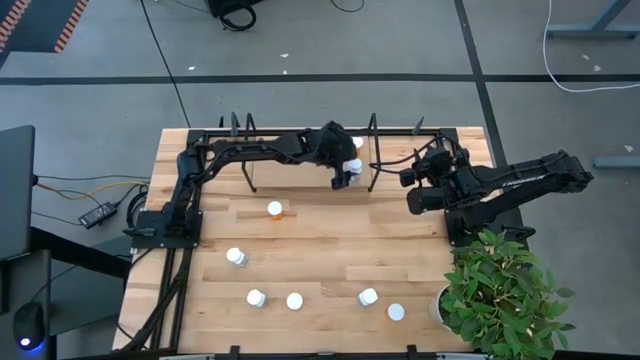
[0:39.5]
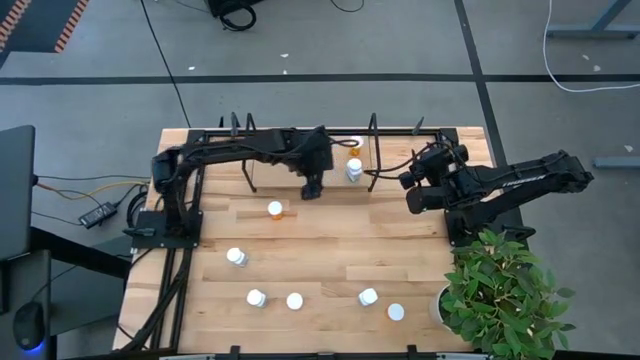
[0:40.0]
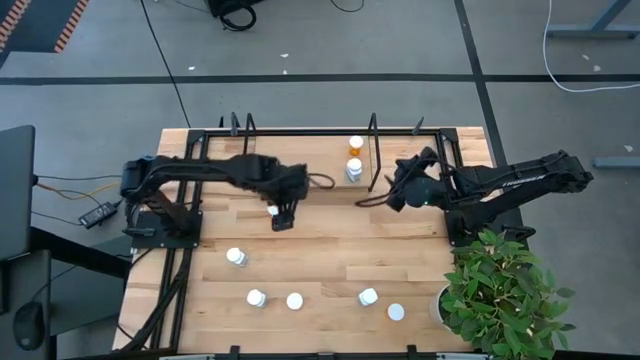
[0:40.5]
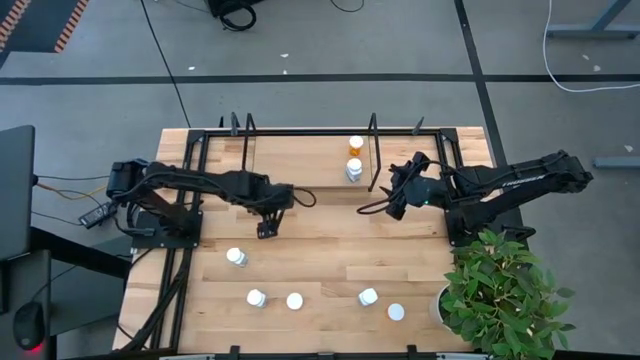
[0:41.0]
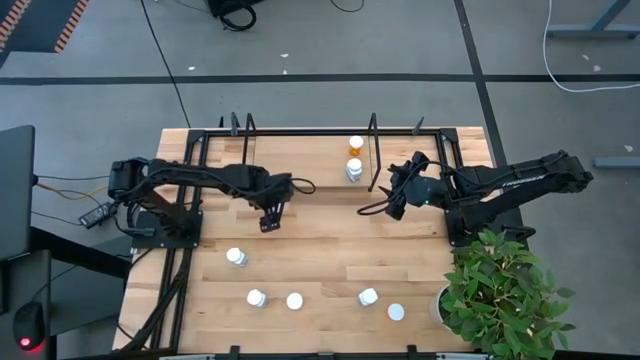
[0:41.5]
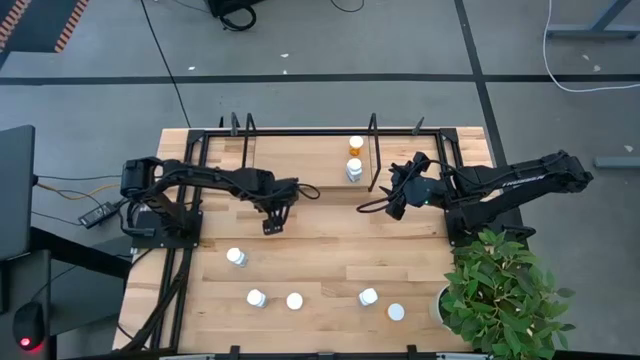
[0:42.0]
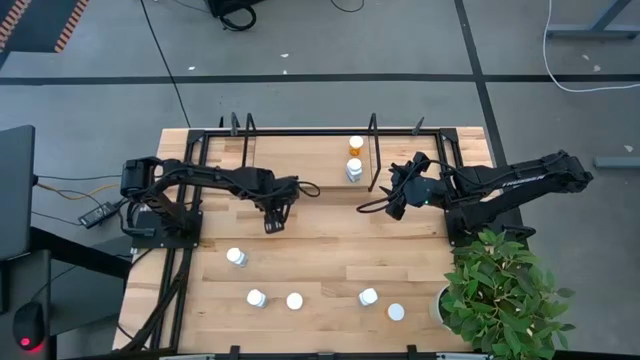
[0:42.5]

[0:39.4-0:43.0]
Task: Pick and place medicine bottles onto shelf by color
Put the orange pill bottle on the shelf

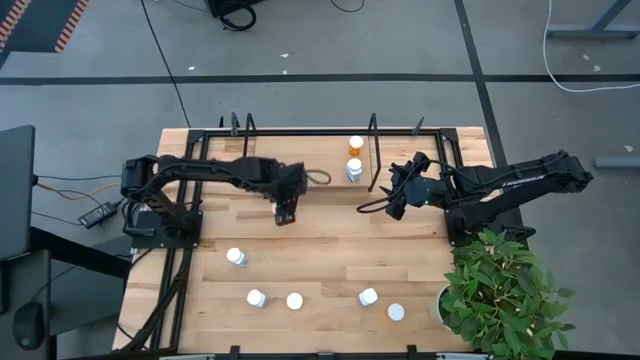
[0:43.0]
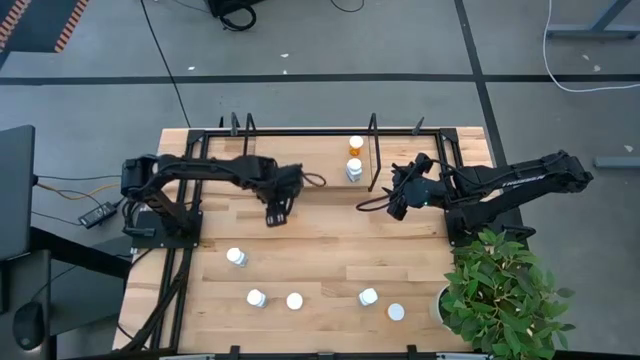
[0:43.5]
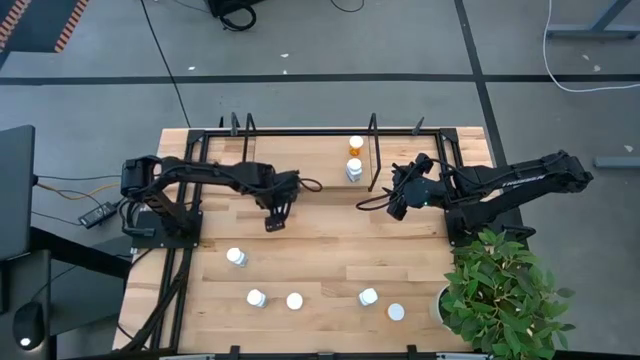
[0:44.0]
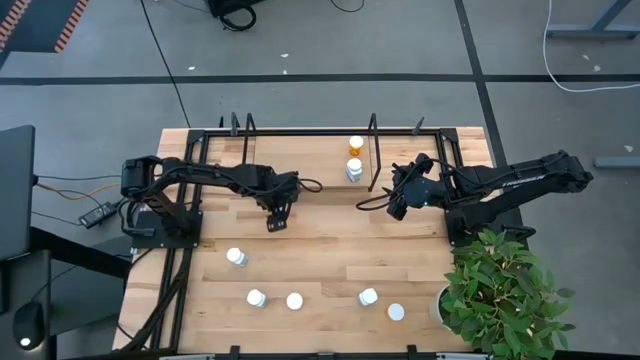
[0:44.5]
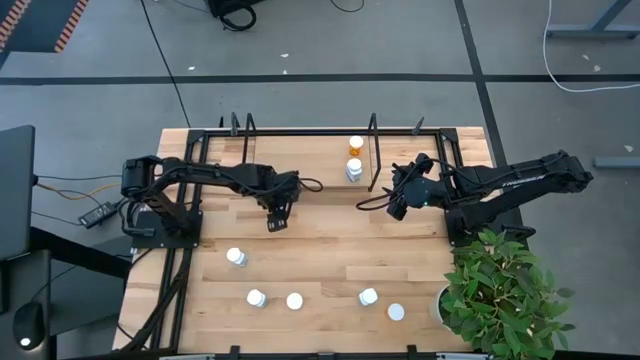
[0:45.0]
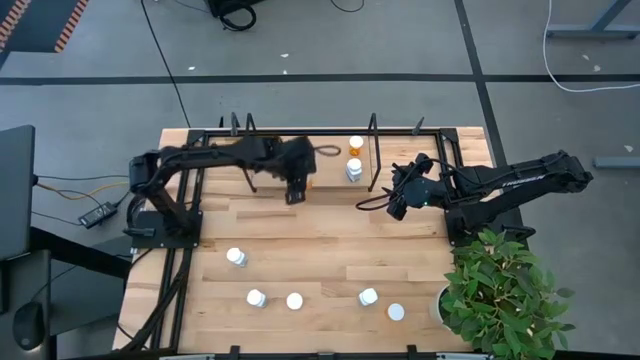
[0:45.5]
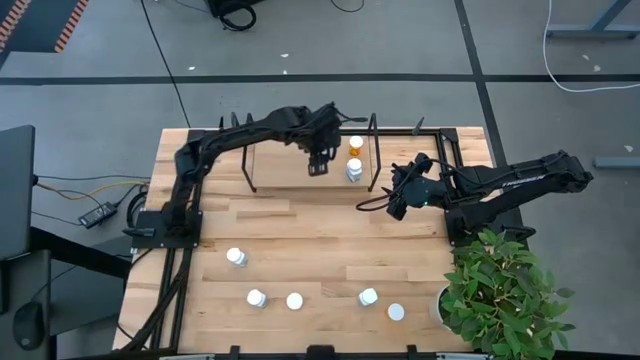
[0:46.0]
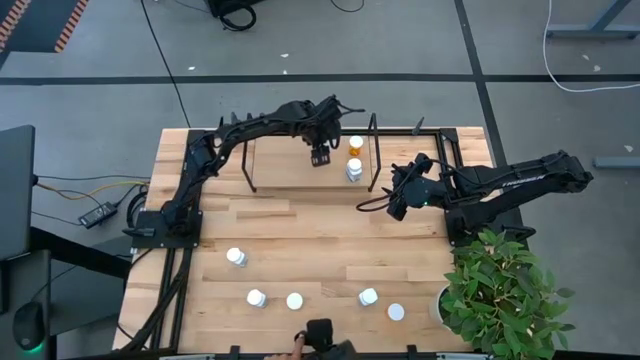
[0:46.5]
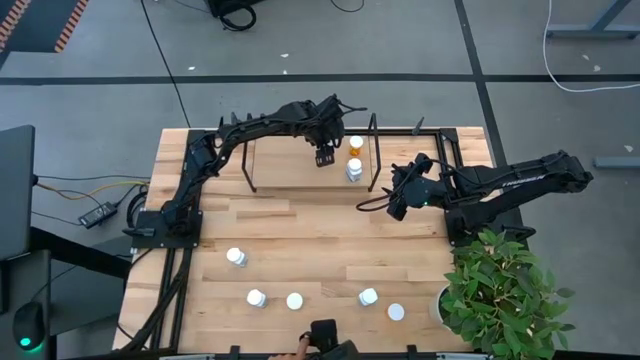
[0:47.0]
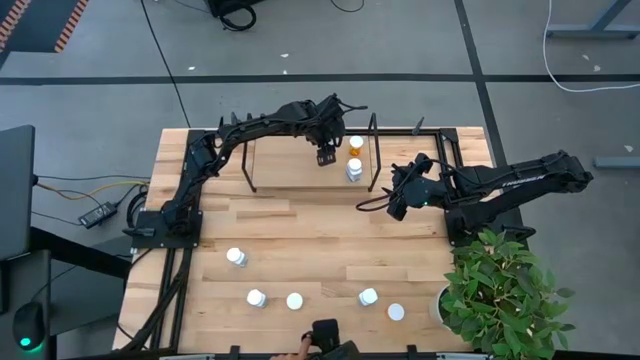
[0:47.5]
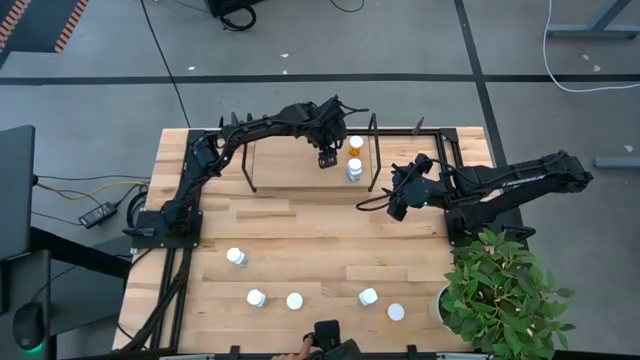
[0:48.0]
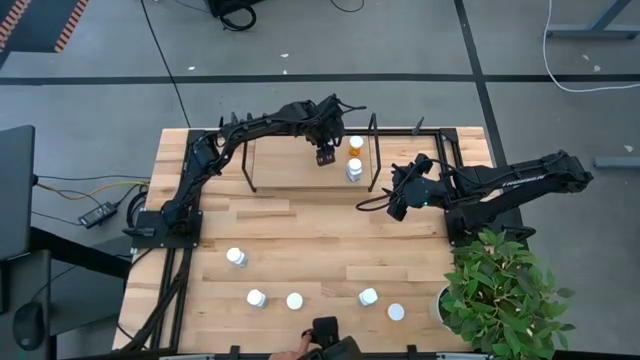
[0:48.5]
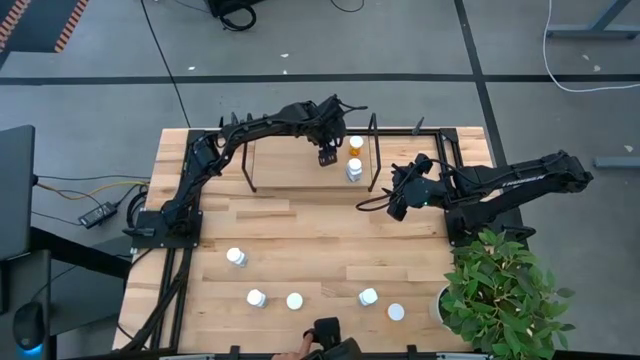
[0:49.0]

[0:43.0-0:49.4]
Put the orange pill bottle on the shelf

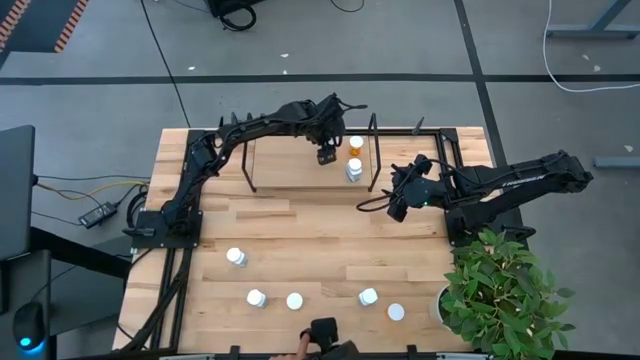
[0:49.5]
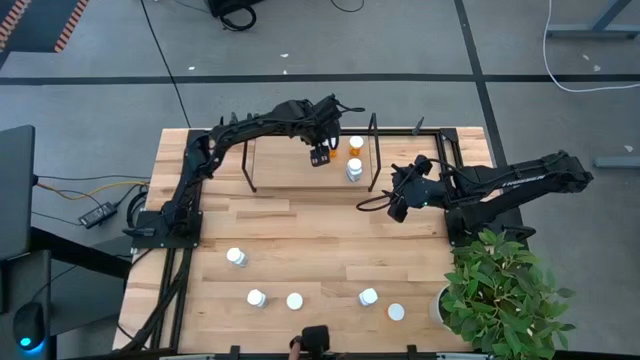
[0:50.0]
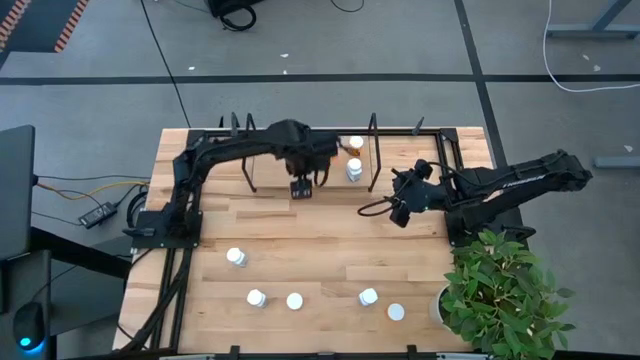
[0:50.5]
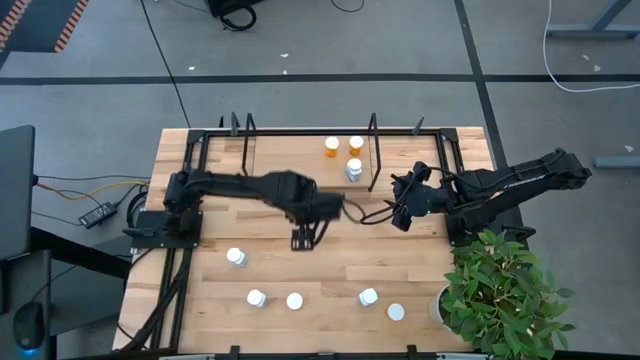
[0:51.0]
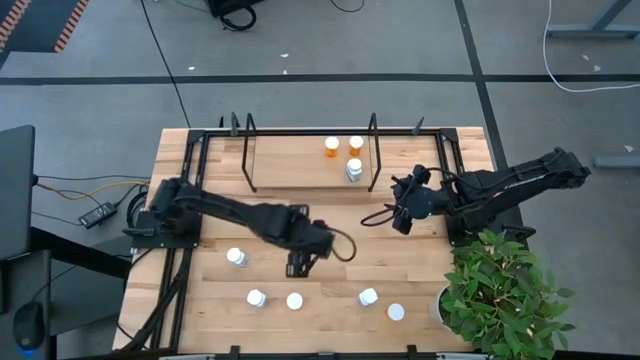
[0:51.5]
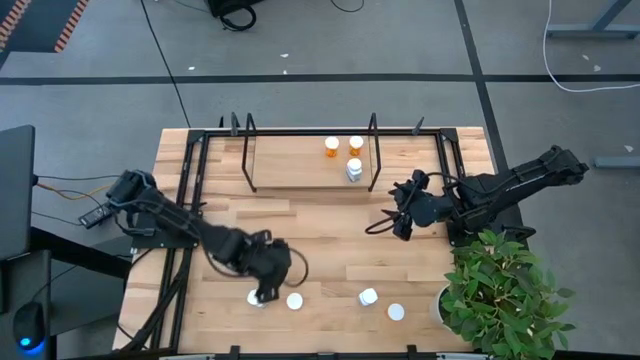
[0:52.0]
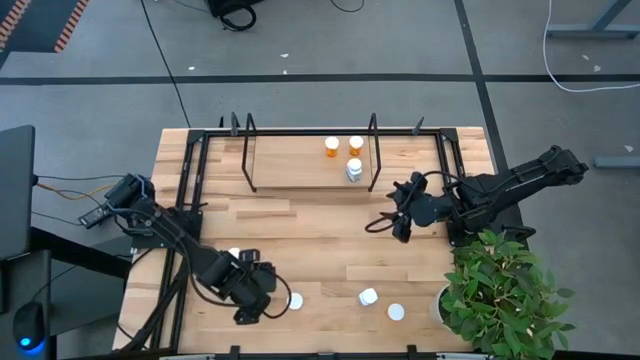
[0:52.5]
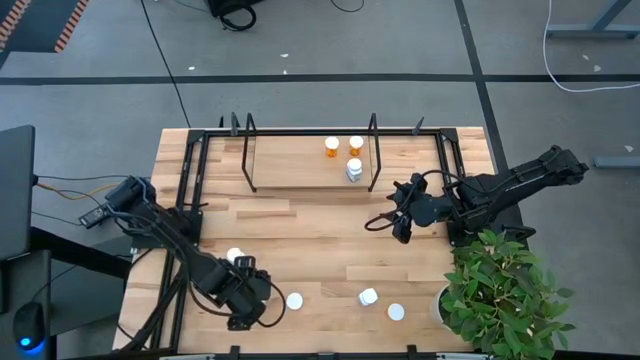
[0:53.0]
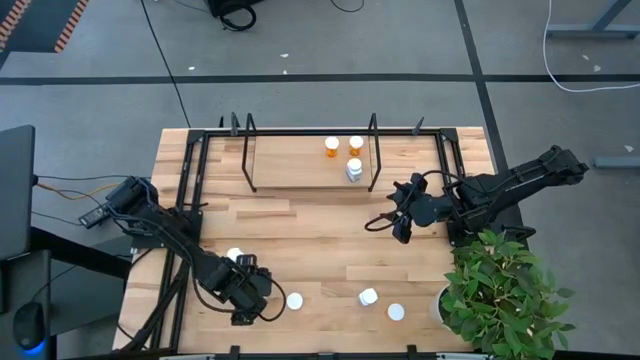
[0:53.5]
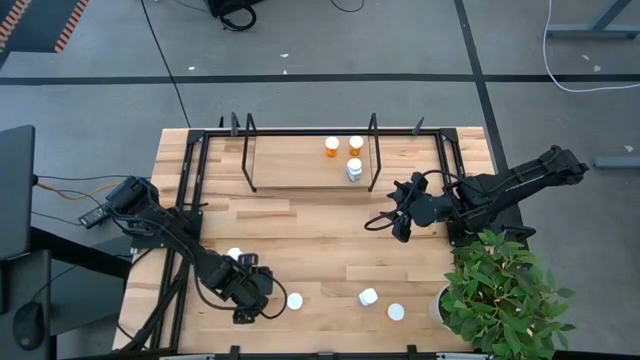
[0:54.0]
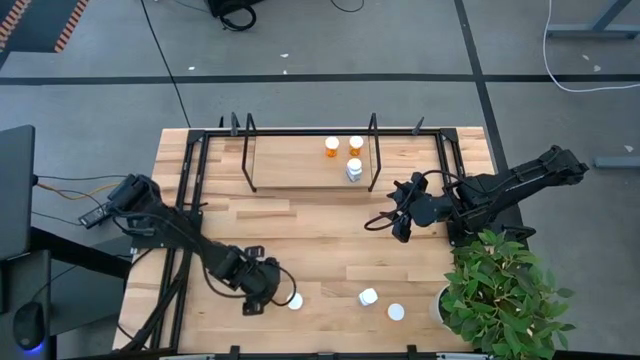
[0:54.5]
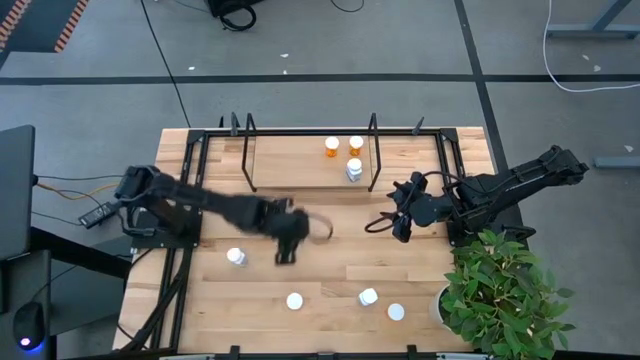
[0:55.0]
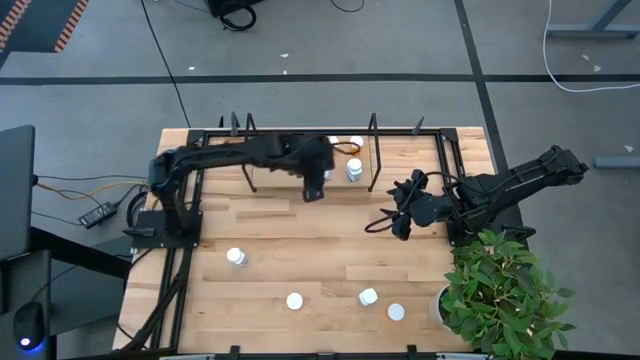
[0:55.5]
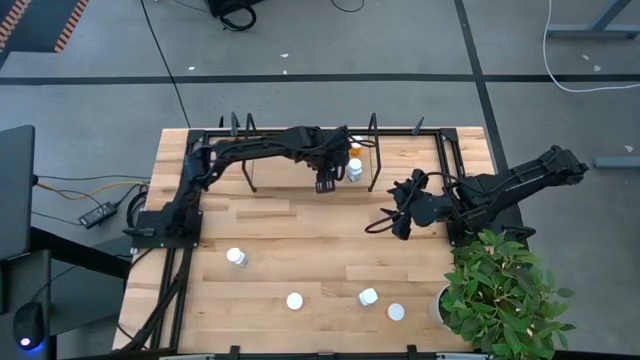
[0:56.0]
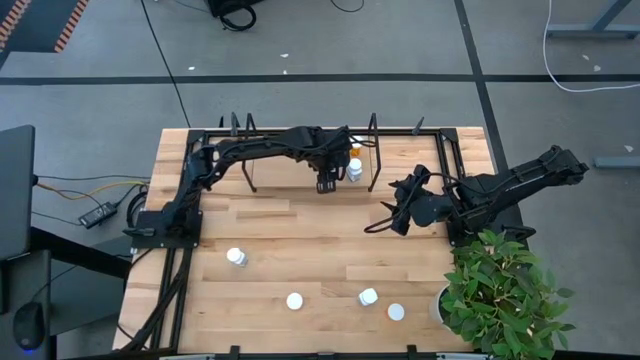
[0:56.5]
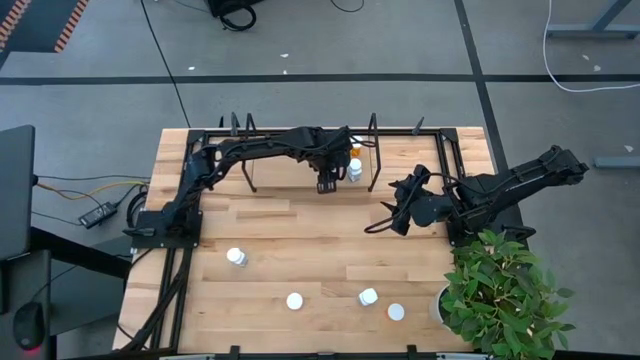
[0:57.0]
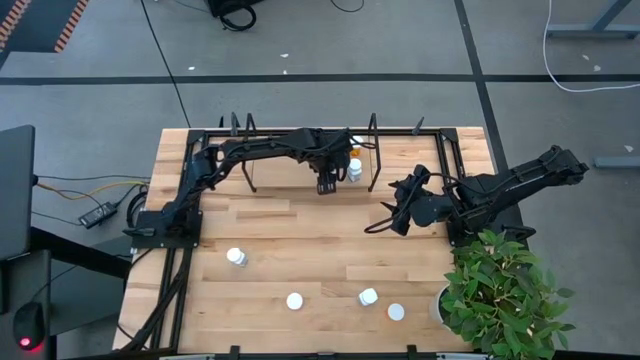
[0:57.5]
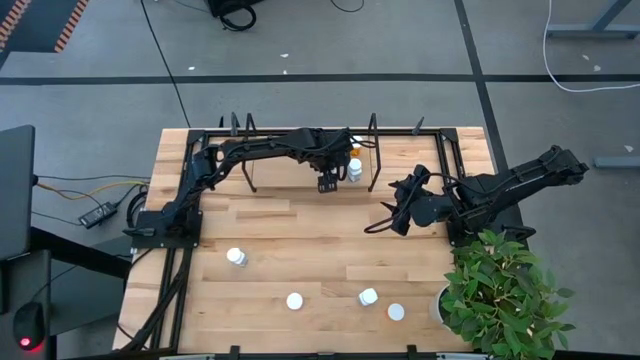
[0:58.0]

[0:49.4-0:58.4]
Put the white pill bottle on the shelf

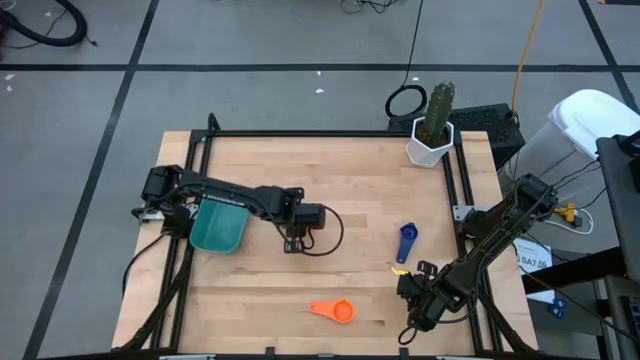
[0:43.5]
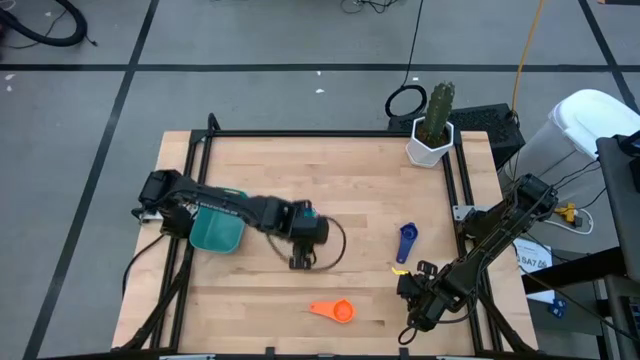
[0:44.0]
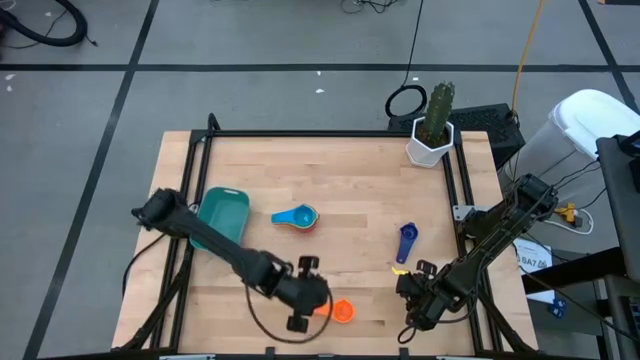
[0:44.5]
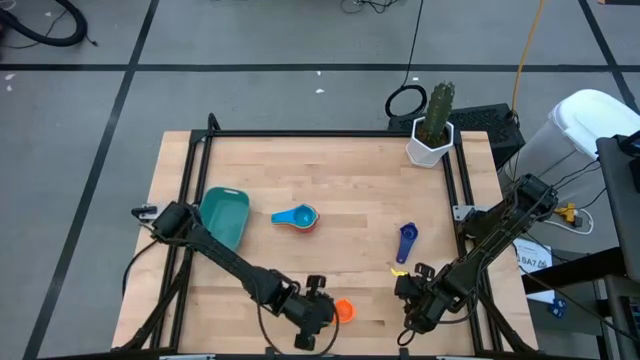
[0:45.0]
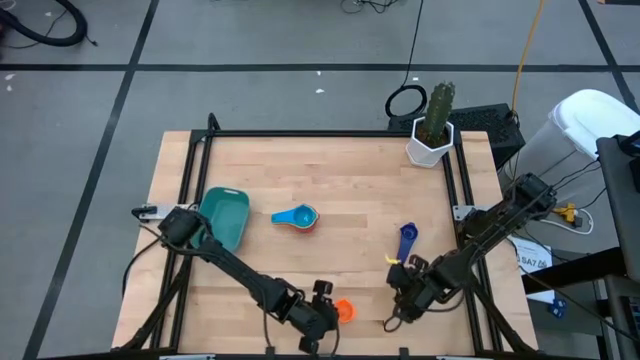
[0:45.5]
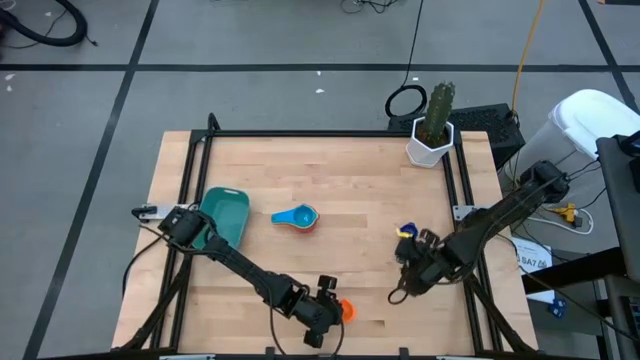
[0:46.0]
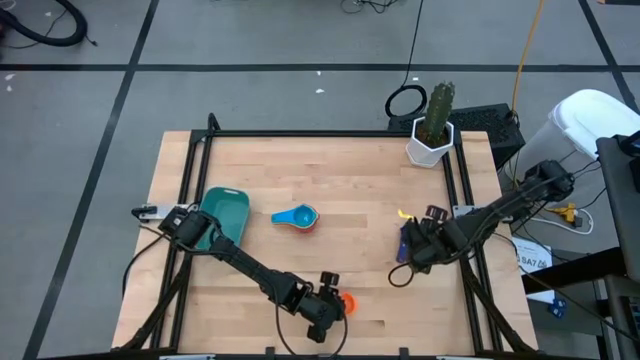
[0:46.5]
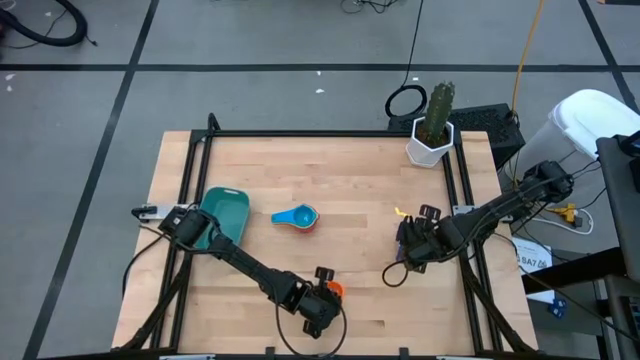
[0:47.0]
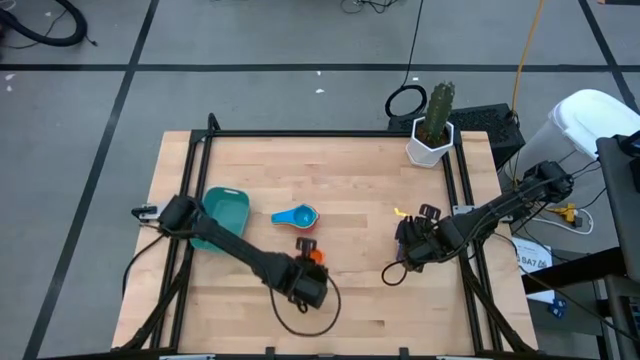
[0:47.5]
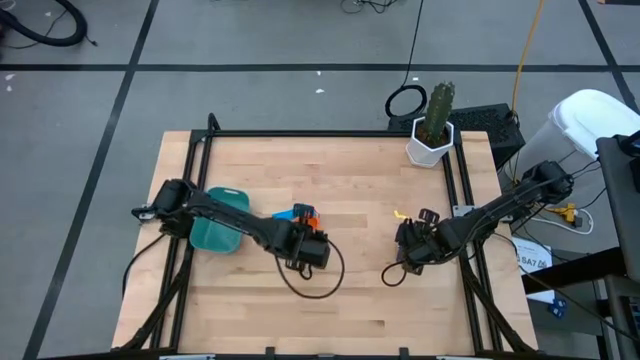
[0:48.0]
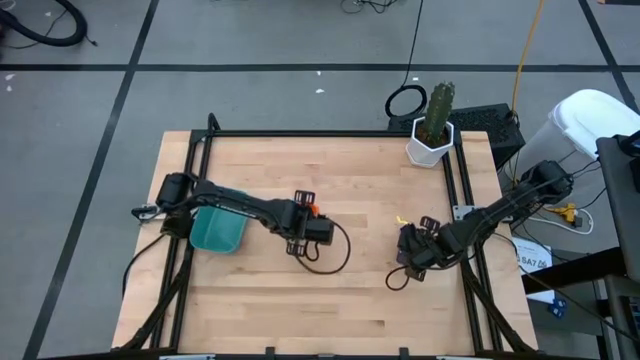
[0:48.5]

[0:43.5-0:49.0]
Task: Nest measuring cups in basket
Stack the orange measuring cup into the light blue measuring cup
